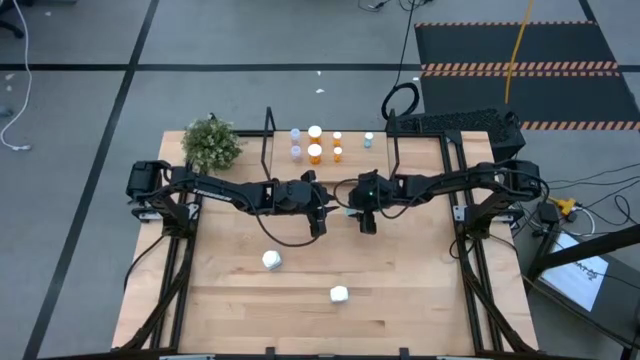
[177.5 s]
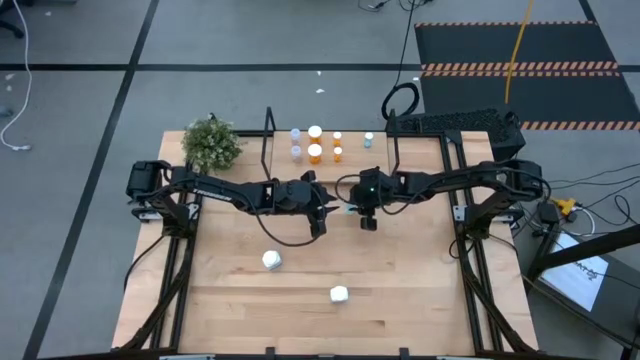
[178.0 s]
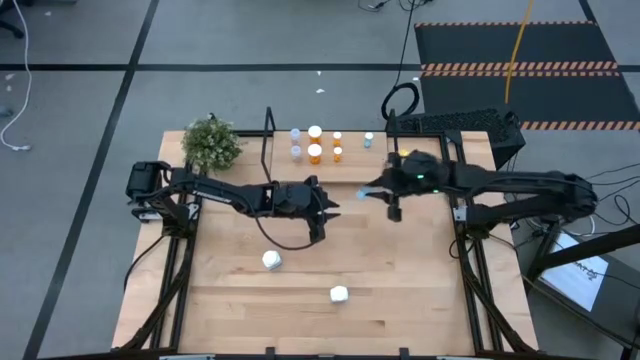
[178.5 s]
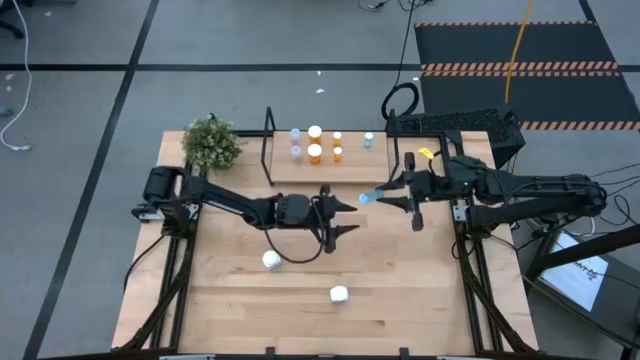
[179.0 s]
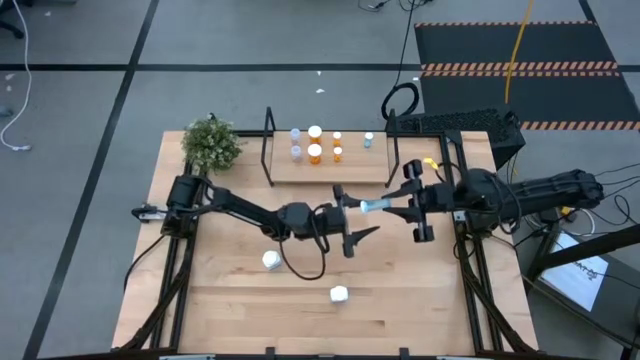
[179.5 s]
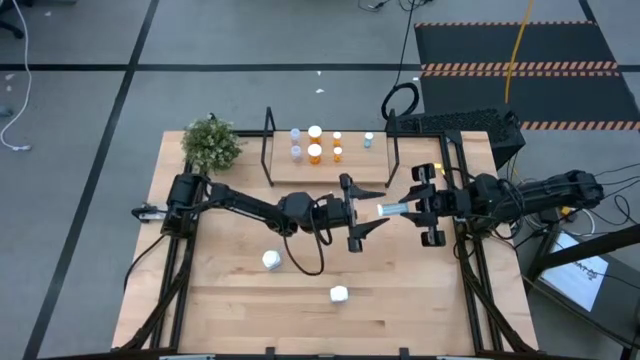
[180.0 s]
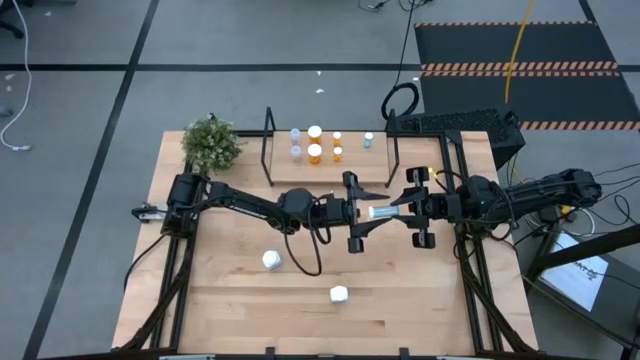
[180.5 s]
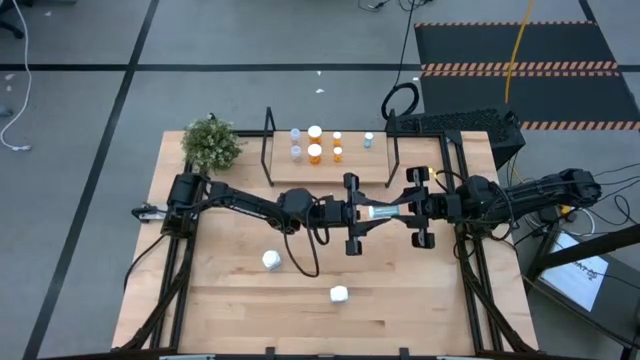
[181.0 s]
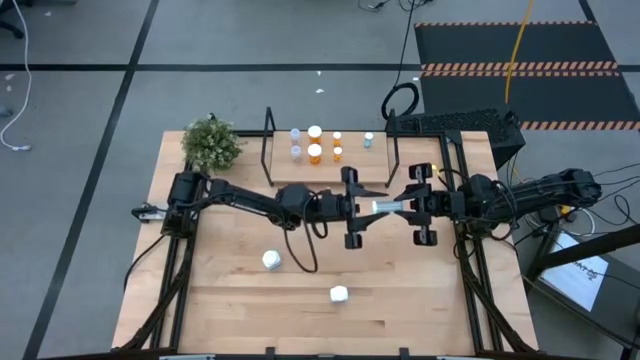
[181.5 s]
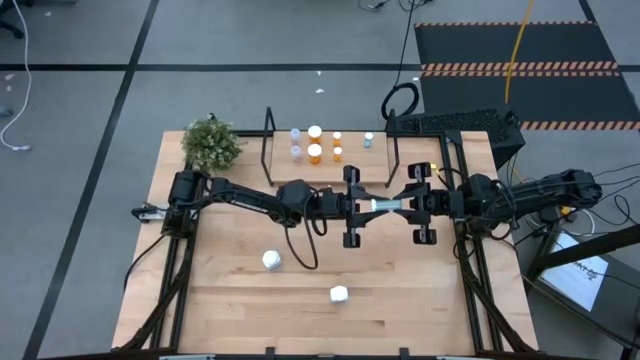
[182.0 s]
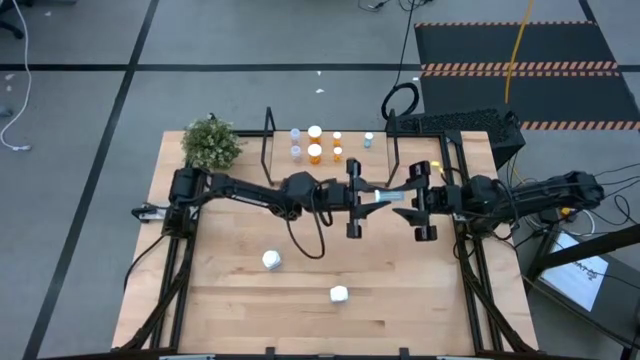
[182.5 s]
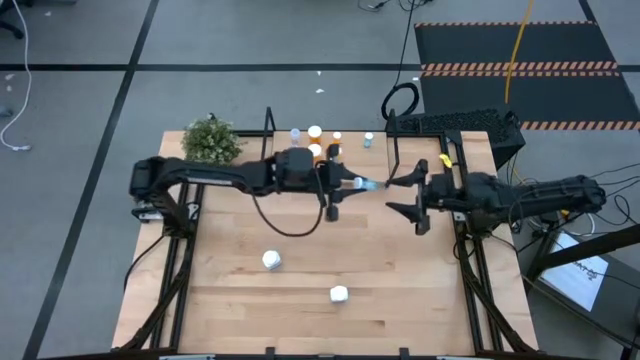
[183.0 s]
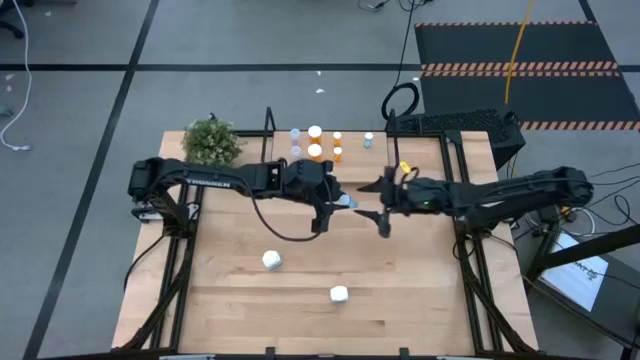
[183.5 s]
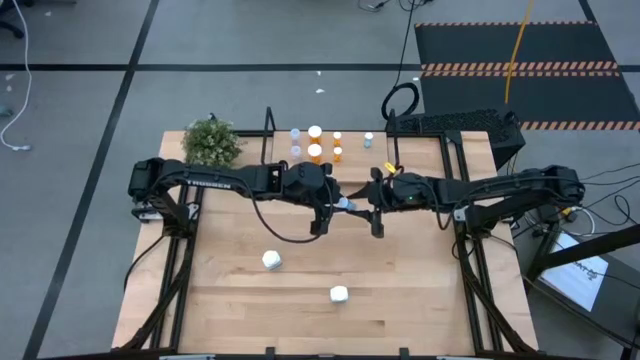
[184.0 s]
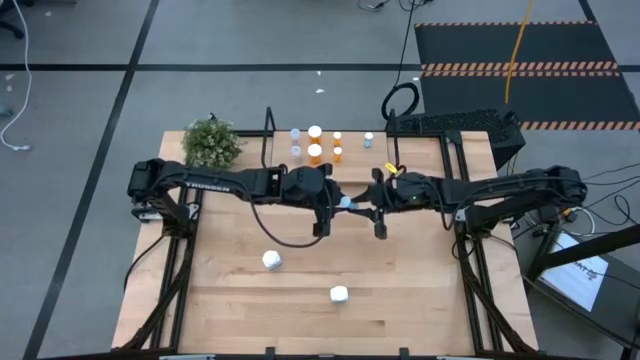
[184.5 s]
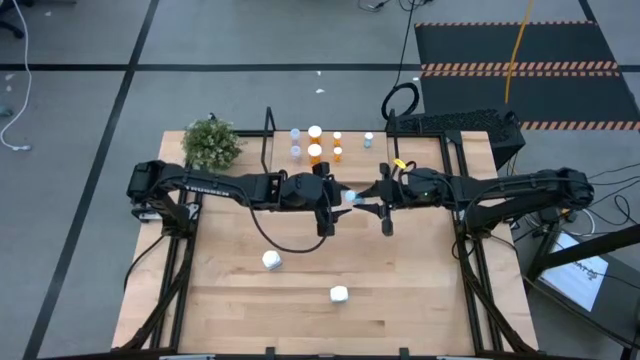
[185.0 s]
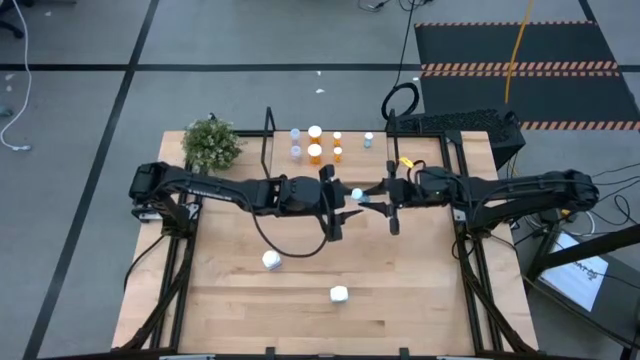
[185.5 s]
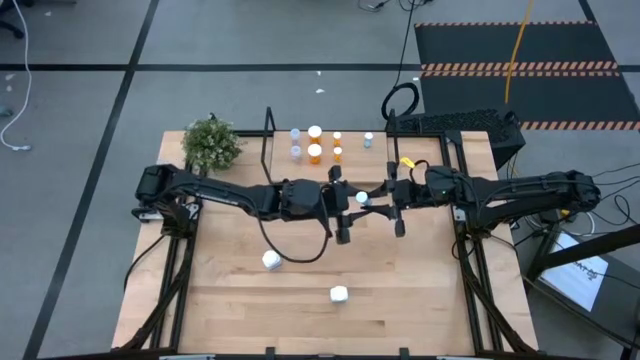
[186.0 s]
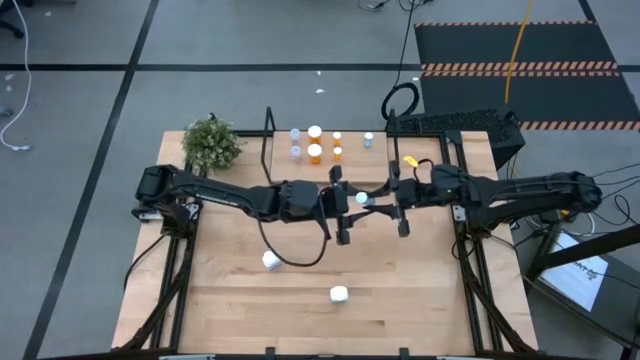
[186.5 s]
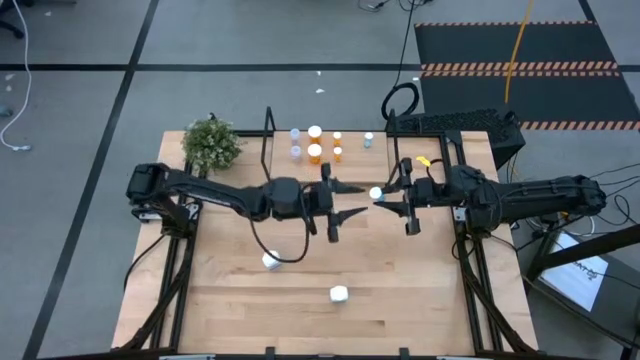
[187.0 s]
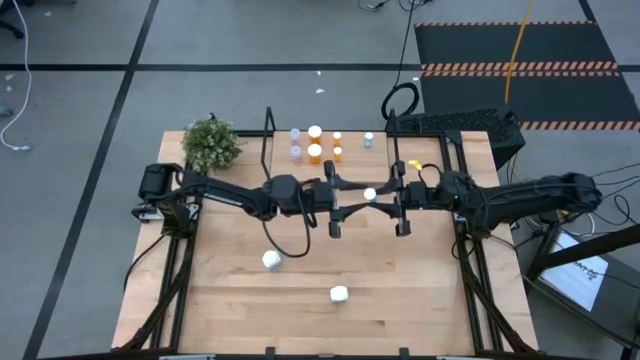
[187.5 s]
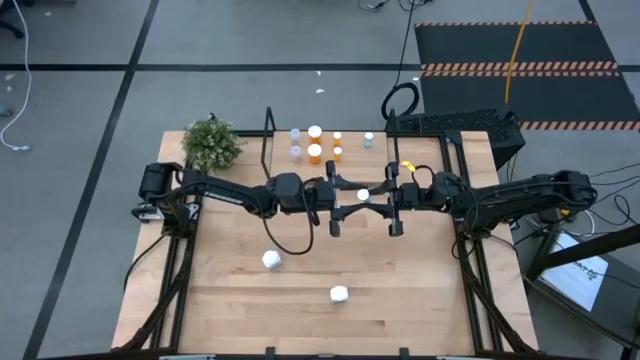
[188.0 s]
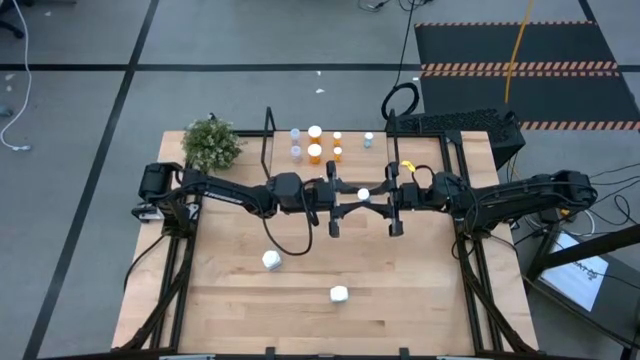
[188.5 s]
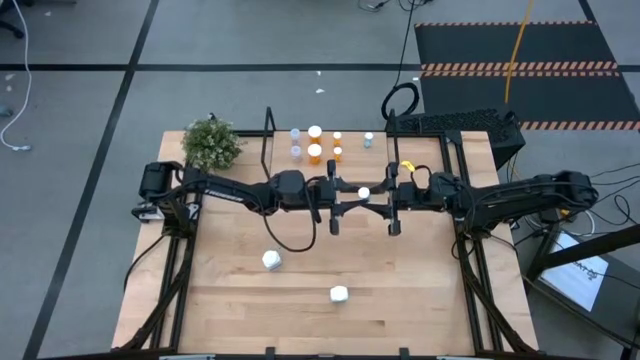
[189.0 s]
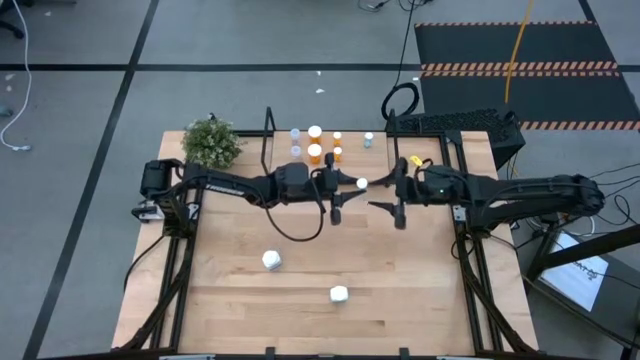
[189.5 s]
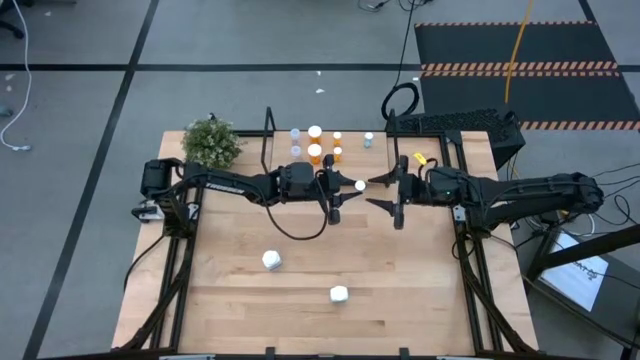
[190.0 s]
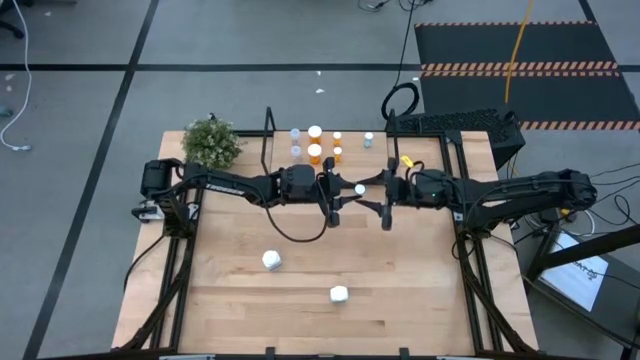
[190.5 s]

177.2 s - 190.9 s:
Task: Pick and place medicine bottles onto shelf by color
Put the blue pill bottle on the shelf aligned with the other blue pill bottle

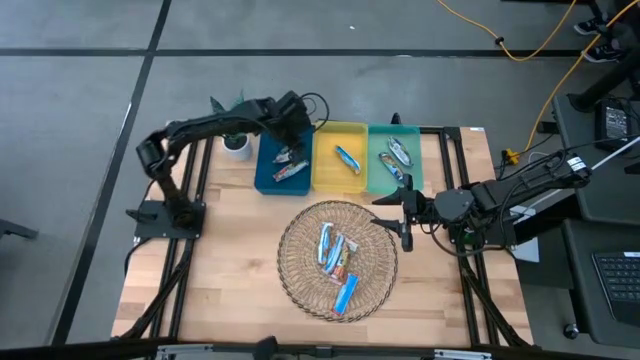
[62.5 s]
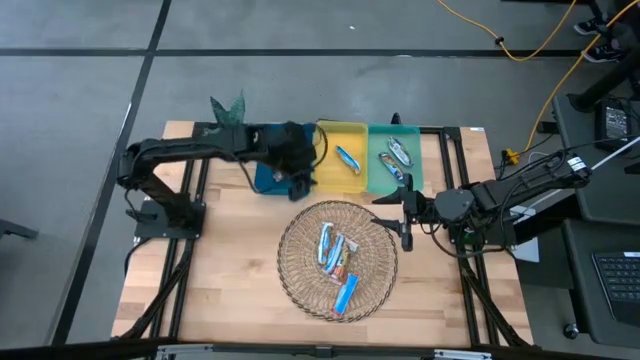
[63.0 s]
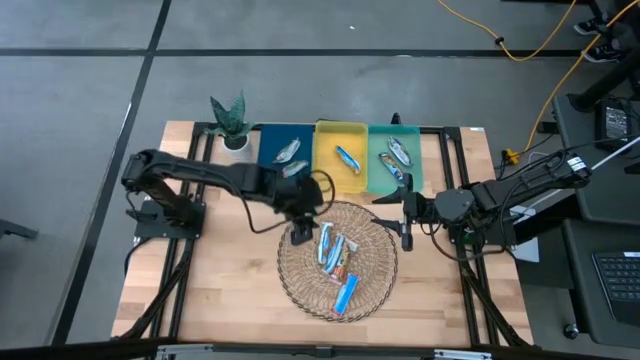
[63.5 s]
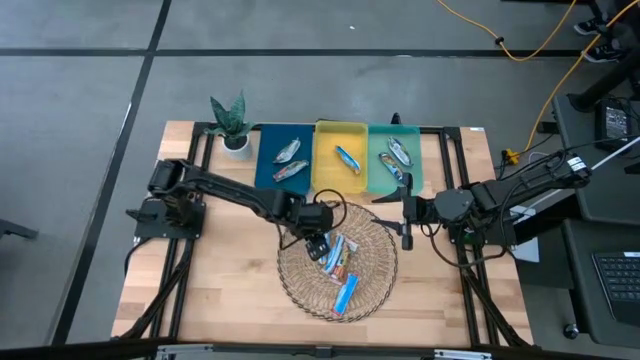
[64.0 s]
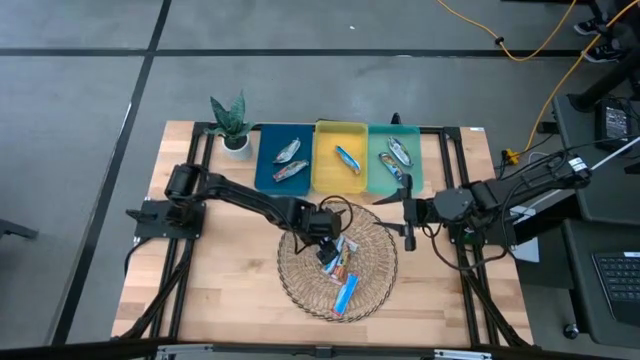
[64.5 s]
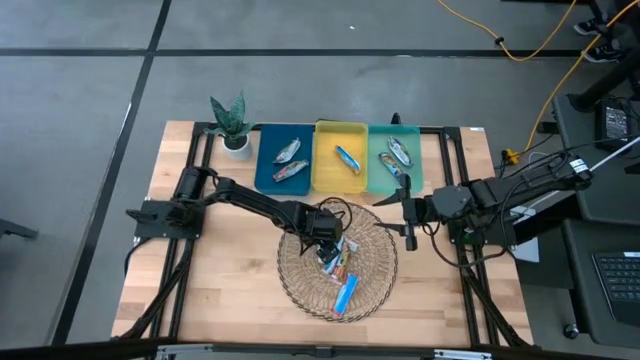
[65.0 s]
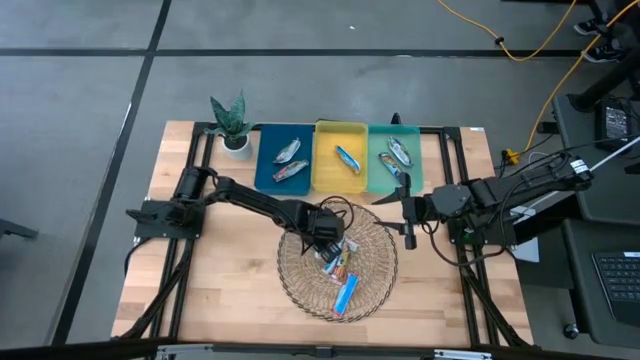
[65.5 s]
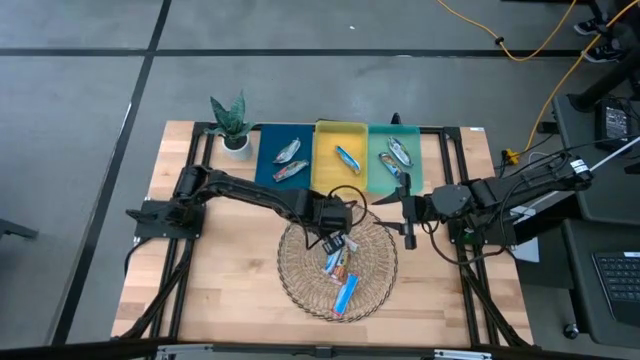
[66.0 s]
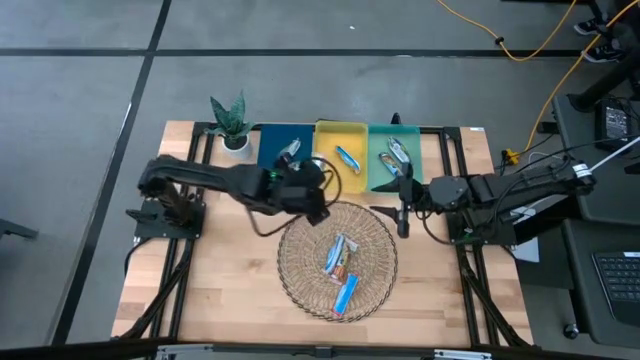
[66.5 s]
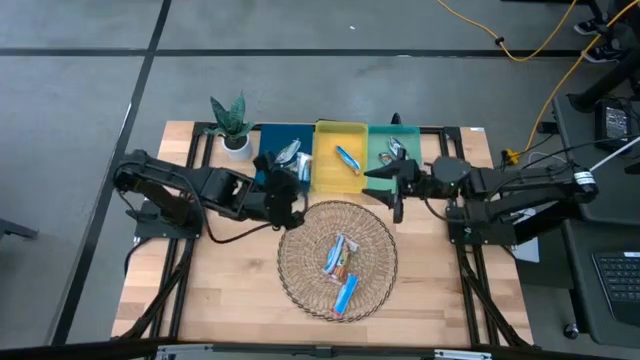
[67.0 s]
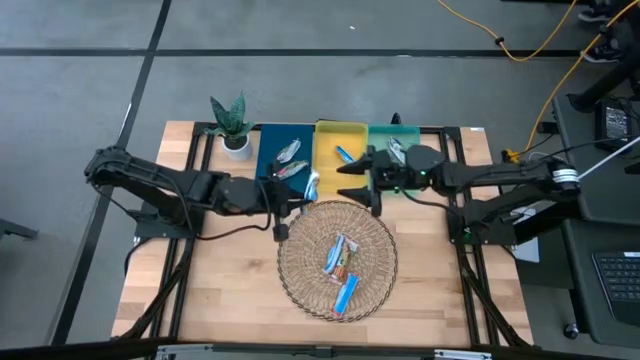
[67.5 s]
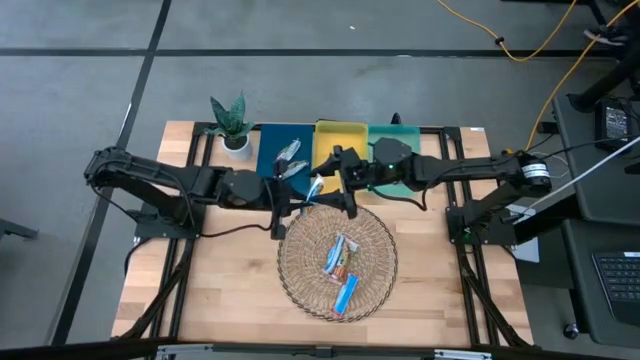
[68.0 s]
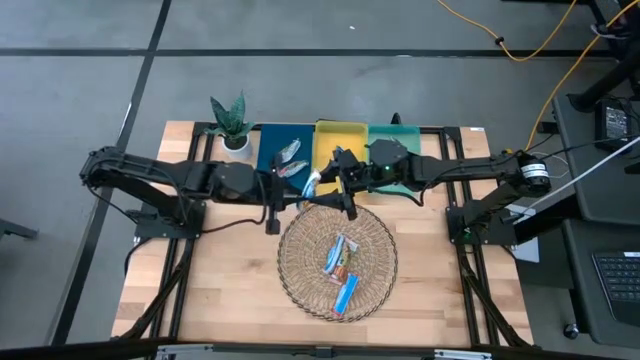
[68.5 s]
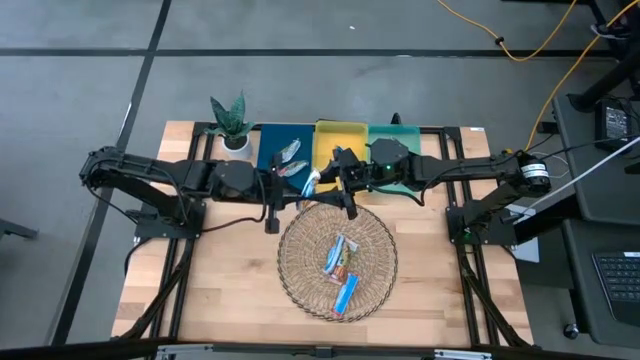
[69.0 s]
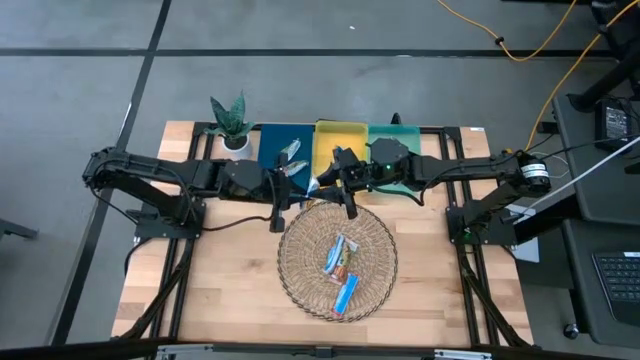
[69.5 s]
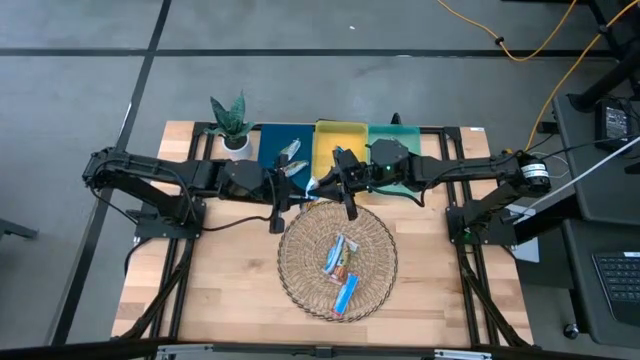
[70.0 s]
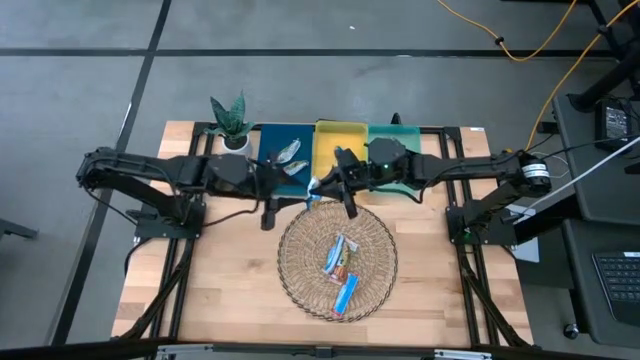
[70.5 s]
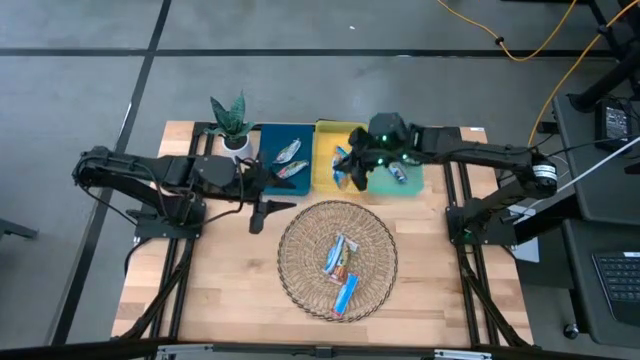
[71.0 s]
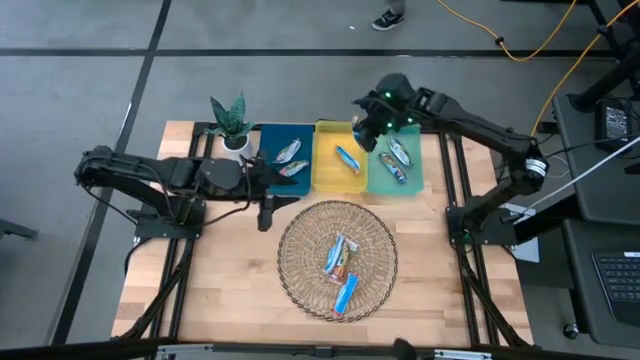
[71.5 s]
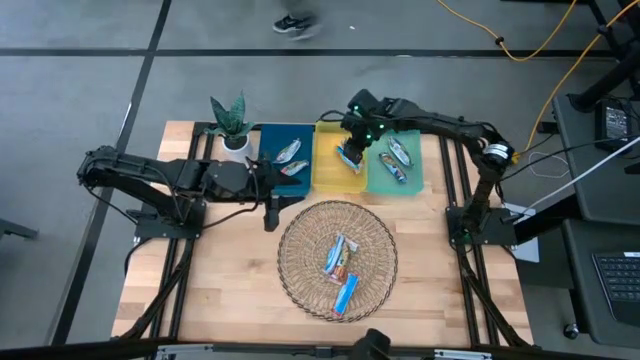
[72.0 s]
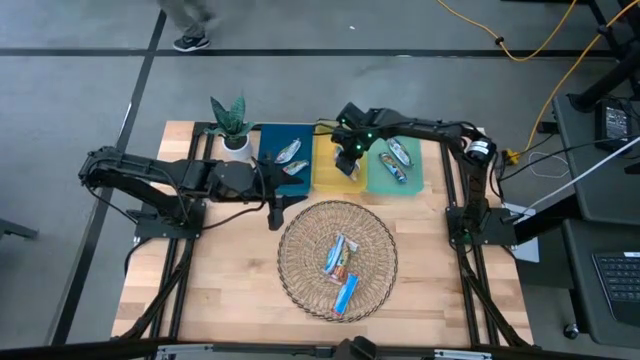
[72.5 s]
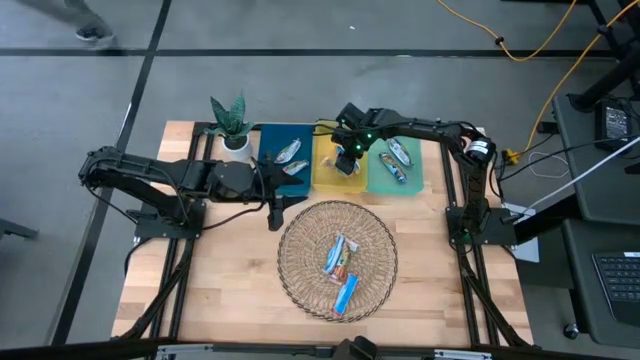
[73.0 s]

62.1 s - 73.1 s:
Task: Pick and place Granola Bars by type
Put the yellow granola bar into the yellow bin
